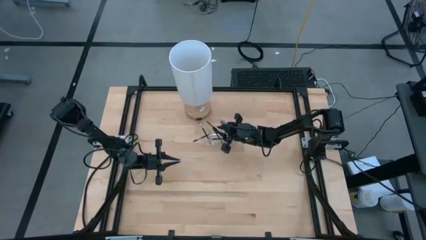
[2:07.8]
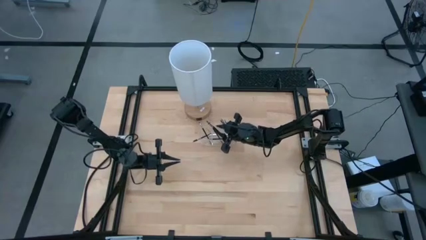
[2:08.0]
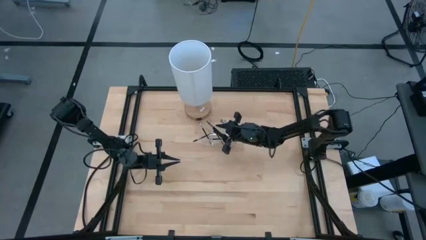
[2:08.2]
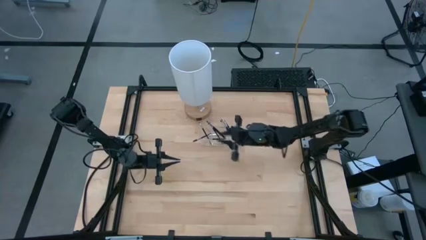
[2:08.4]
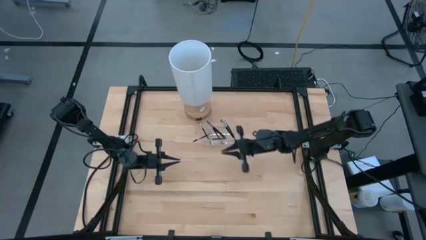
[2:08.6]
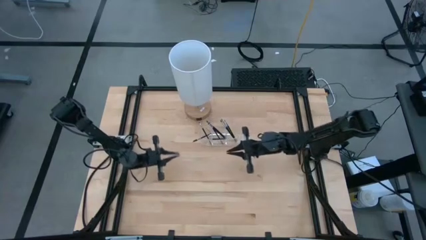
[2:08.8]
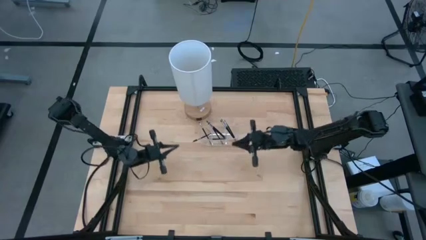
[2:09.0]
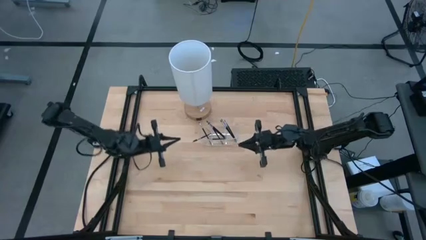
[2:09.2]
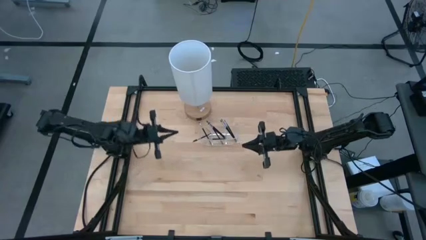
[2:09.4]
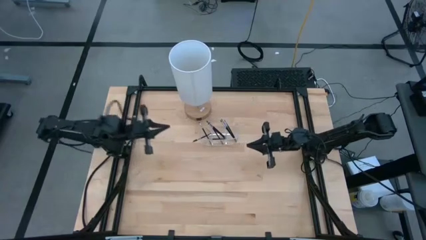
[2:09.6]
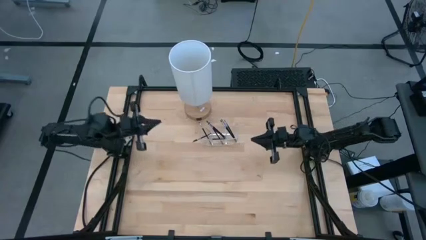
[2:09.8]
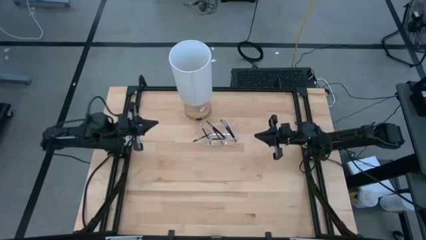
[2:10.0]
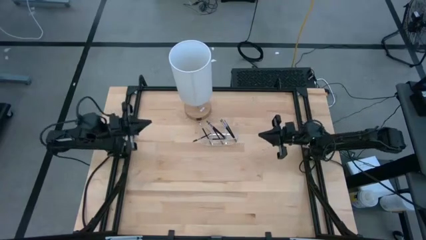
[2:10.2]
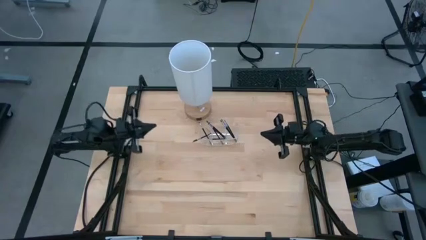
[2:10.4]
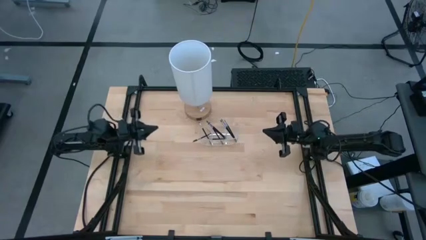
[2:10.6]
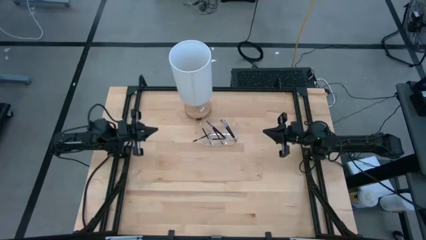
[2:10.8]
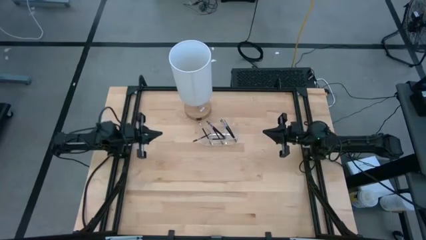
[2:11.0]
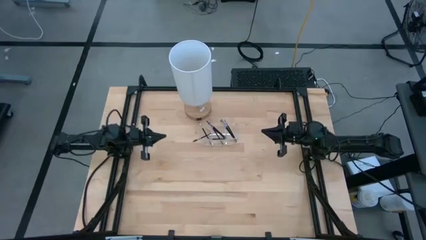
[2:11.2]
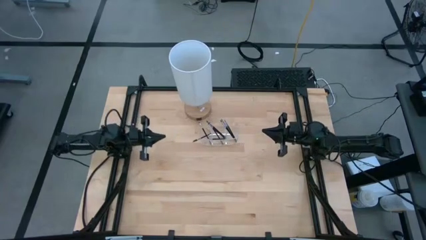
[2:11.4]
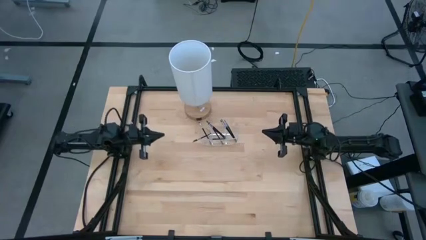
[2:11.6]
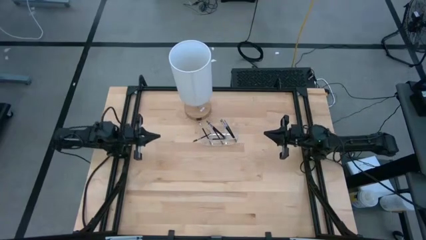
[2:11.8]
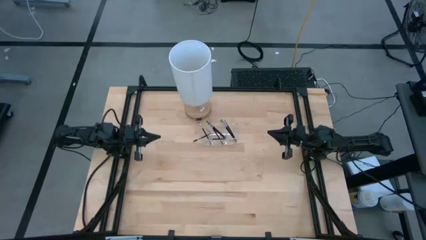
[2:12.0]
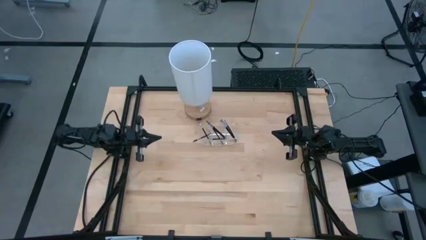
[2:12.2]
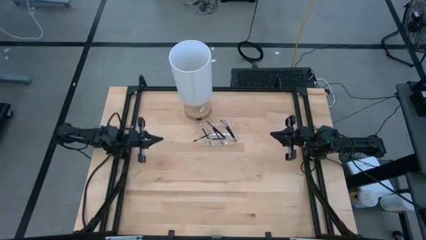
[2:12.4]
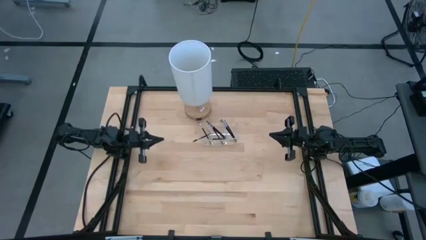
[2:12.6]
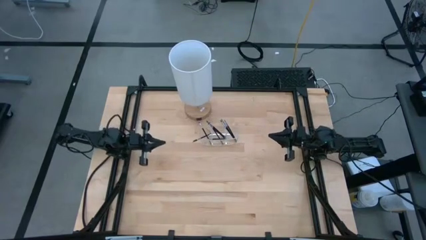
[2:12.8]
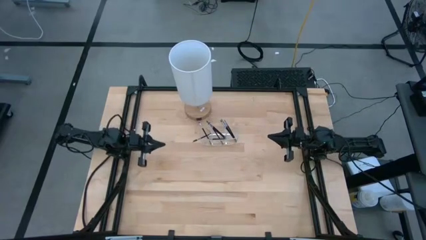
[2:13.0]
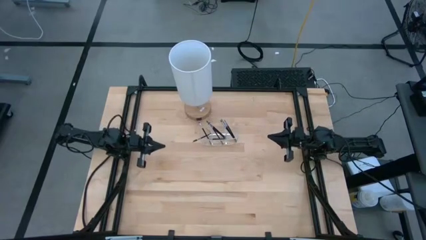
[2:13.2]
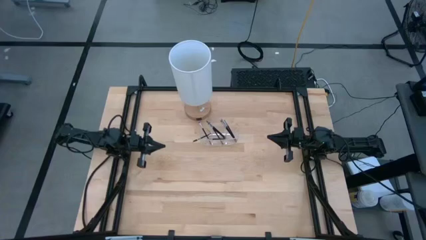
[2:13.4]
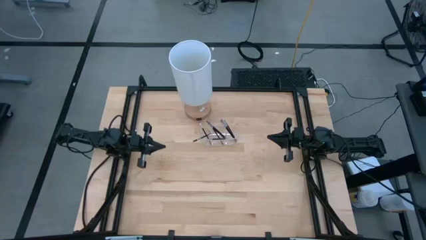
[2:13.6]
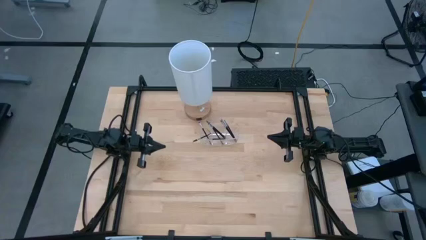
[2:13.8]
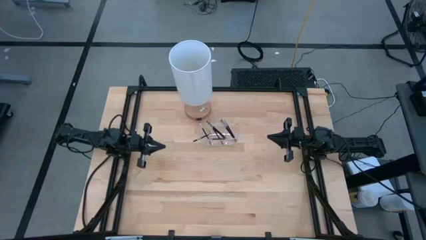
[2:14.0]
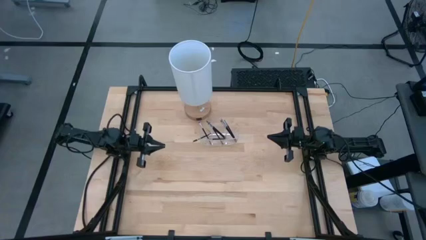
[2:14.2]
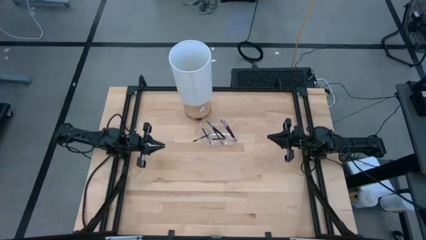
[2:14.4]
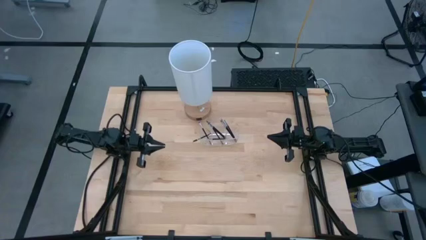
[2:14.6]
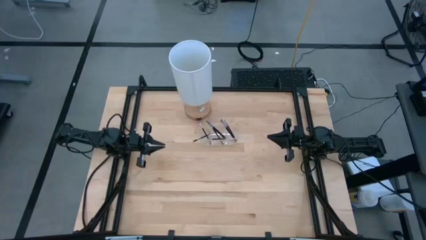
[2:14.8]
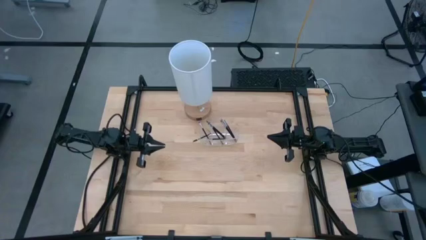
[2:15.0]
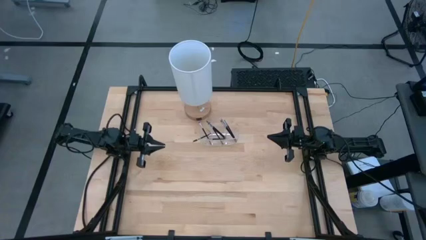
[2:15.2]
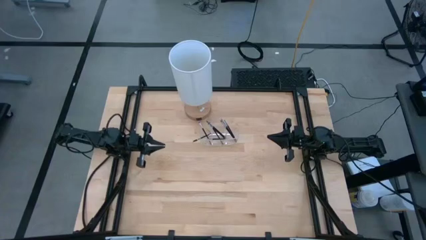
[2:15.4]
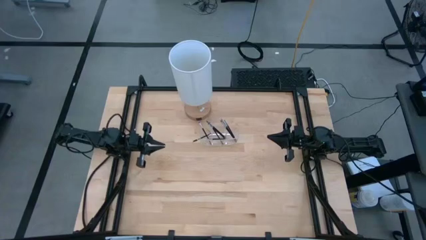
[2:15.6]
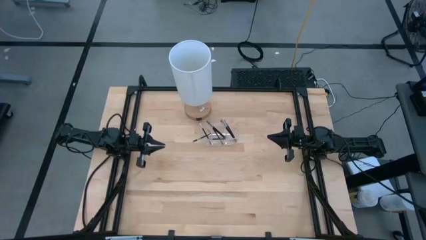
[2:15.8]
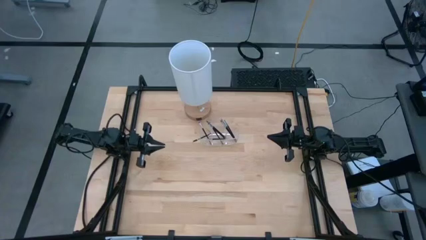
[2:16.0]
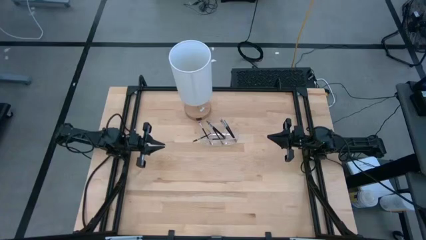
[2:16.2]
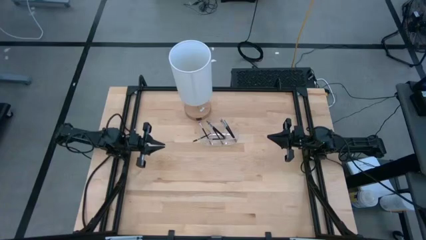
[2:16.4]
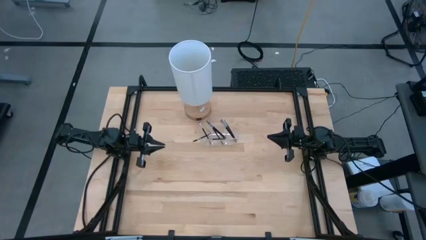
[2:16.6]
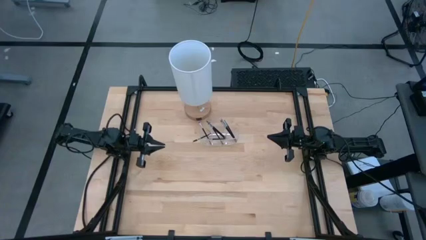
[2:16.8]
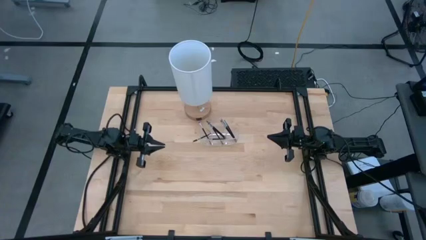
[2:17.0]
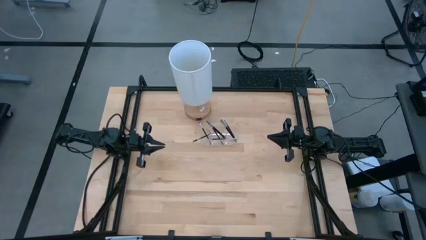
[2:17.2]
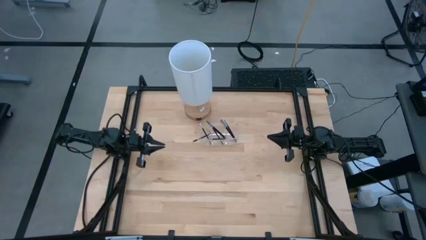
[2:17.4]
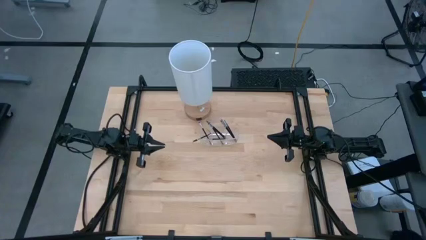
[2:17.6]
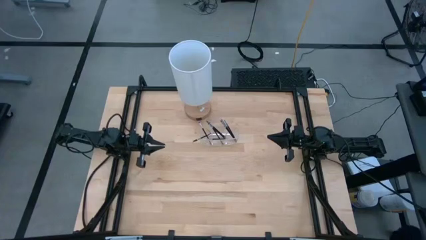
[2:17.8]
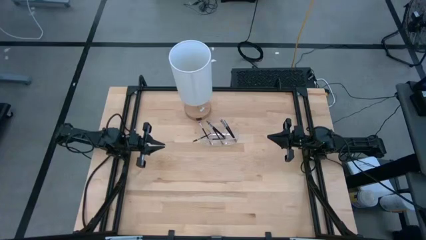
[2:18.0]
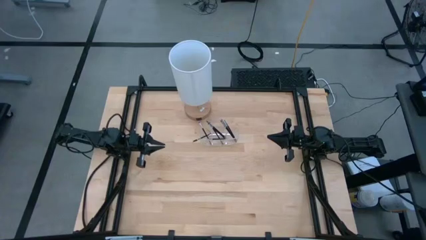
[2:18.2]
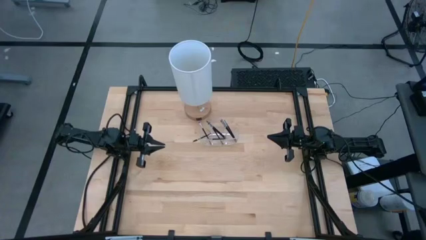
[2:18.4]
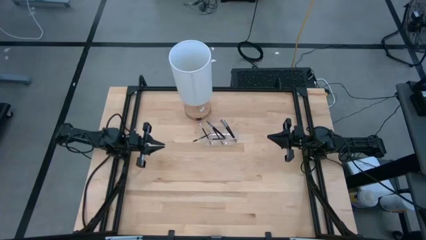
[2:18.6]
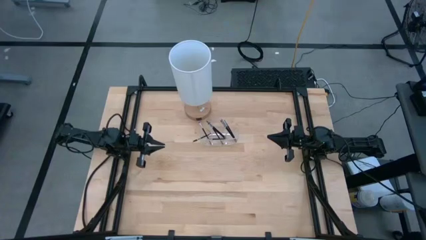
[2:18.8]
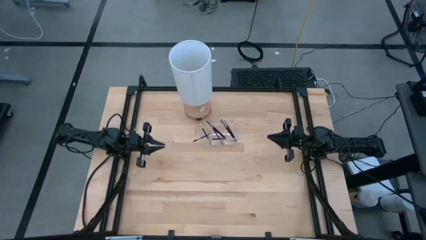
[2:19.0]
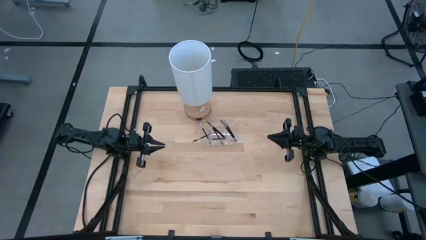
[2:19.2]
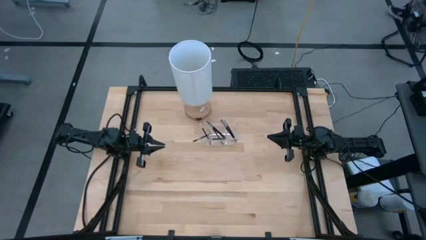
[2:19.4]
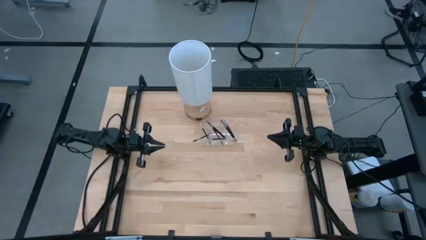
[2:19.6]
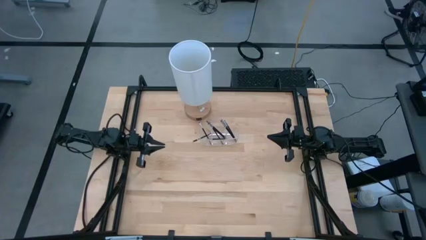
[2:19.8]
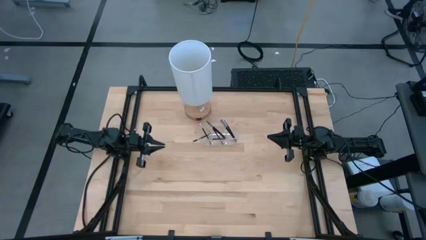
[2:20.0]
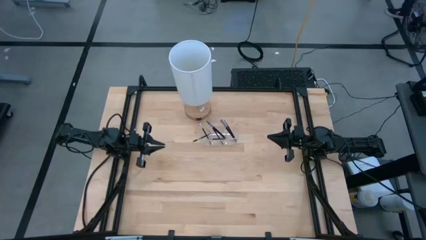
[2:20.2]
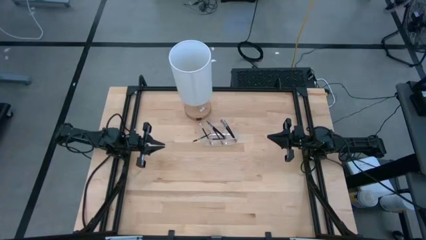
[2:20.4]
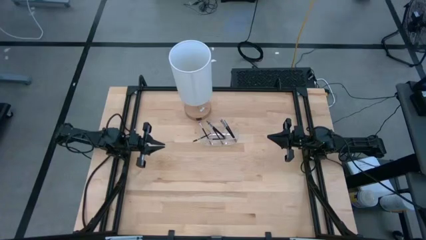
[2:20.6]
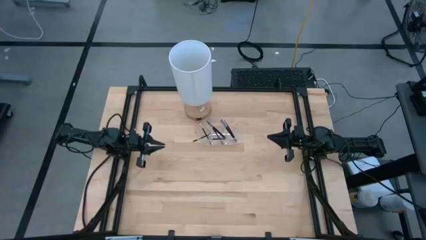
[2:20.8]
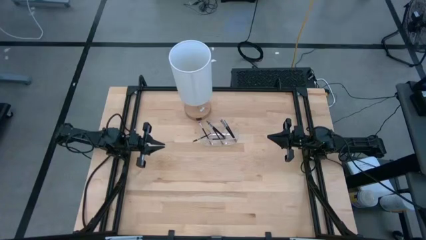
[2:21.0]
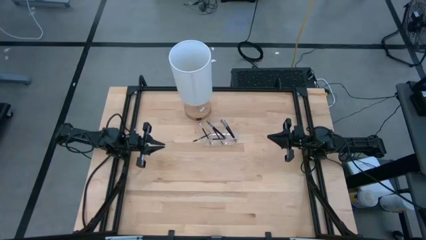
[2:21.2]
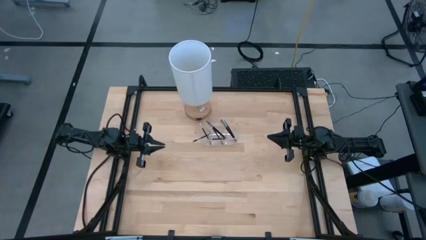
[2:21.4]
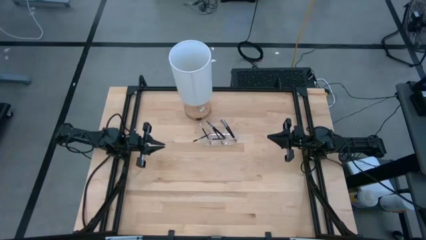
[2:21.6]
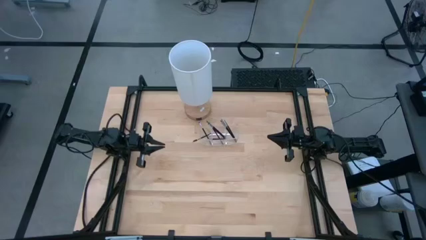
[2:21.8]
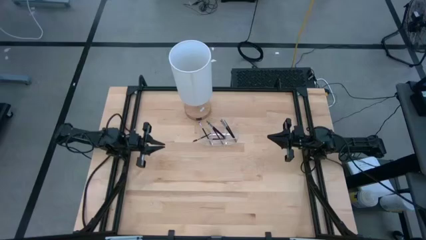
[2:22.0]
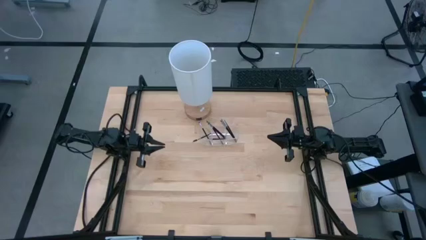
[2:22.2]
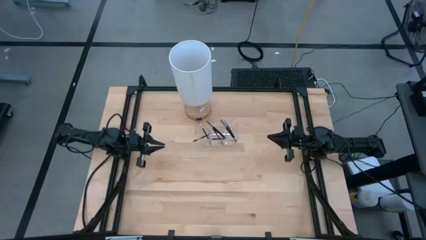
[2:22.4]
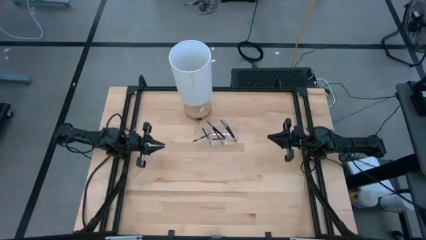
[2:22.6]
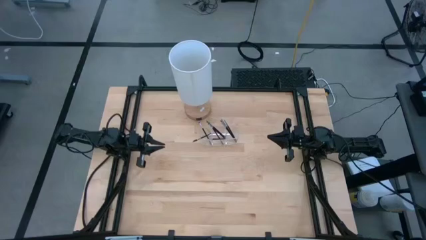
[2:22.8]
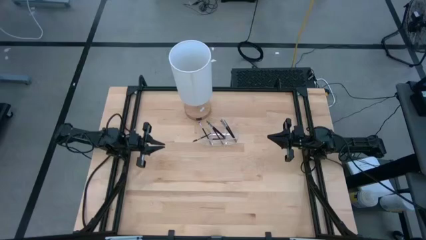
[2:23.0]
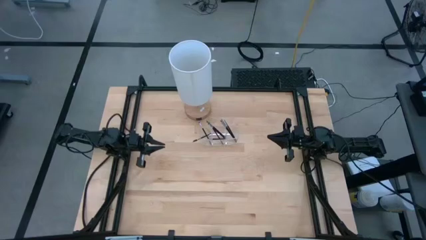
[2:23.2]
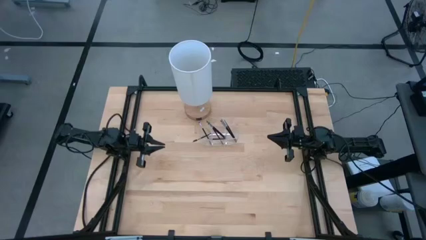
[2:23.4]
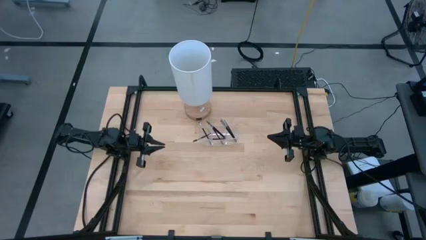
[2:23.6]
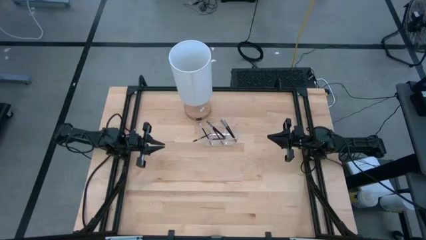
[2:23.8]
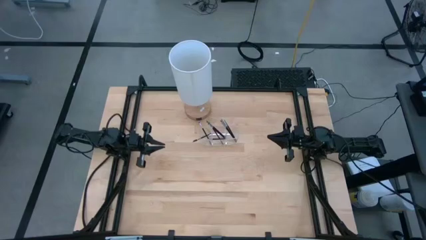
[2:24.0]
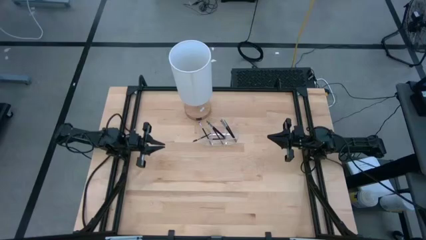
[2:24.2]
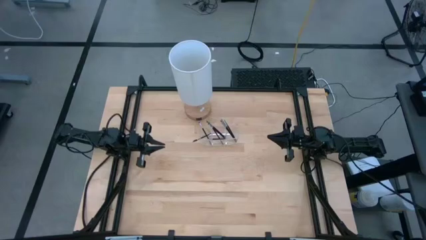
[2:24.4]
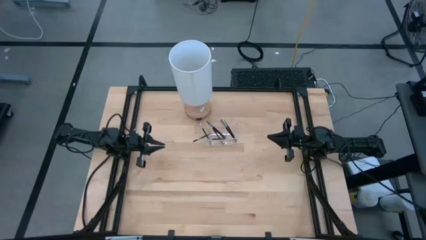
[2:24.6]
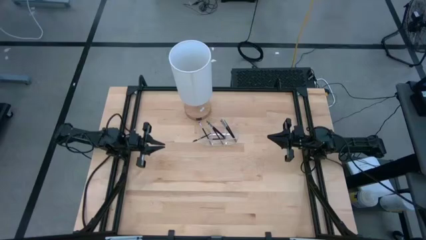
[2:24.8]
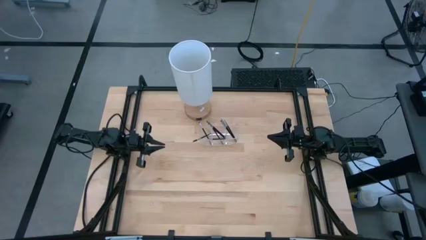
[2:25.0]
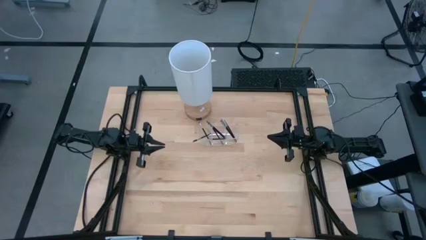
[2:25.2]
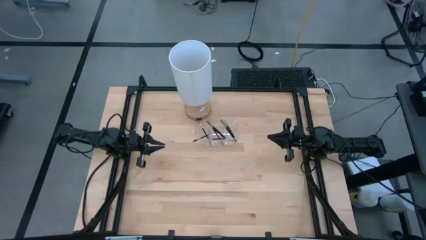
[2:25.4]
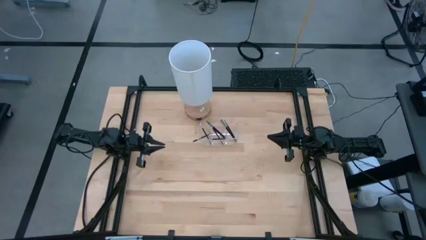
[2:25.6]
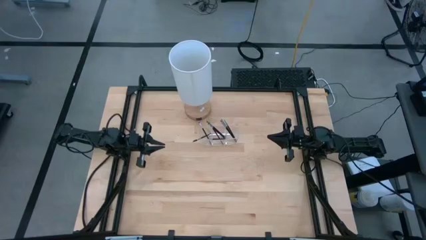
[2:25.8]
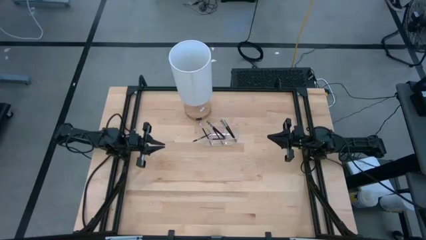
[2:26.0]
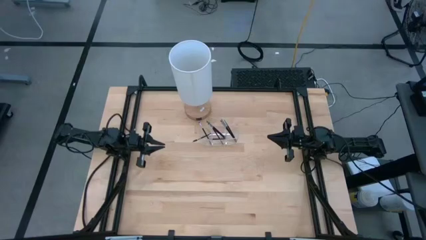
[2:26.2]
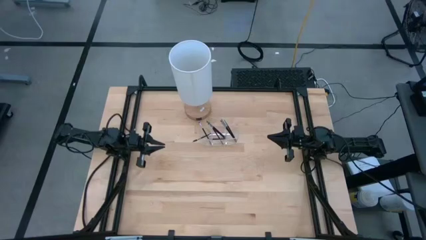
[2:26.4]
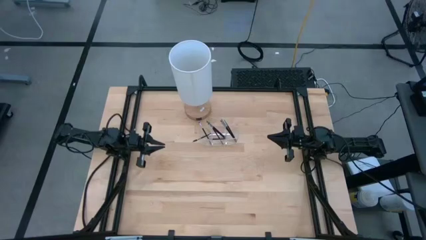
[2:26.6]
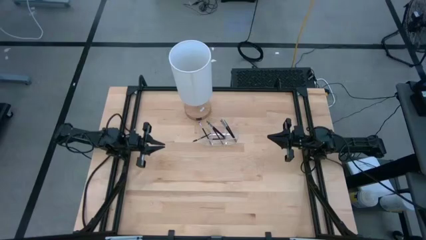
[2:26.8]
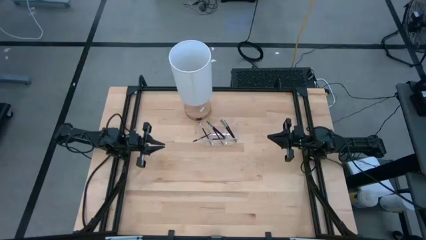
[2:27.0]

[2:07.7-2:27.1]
Task: Pick & Place Makeup Supplies
Return to Home Position
